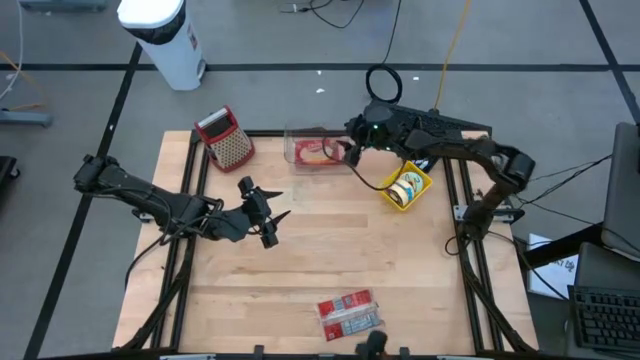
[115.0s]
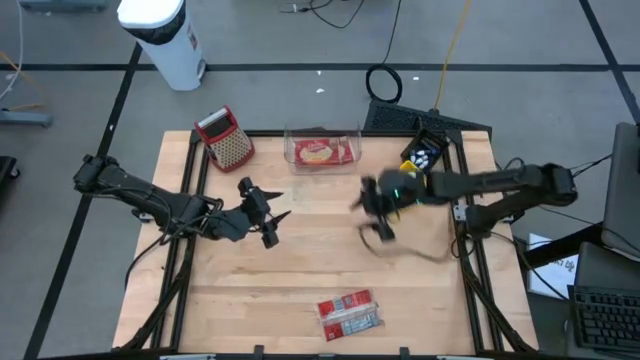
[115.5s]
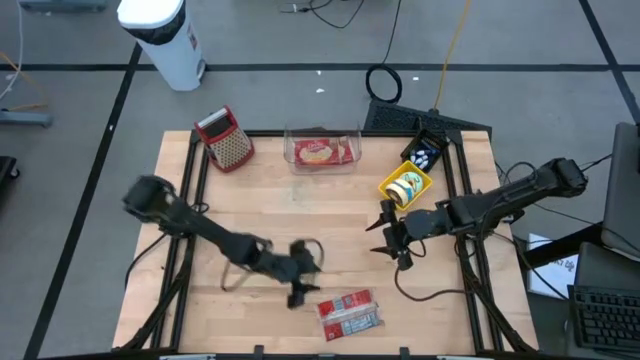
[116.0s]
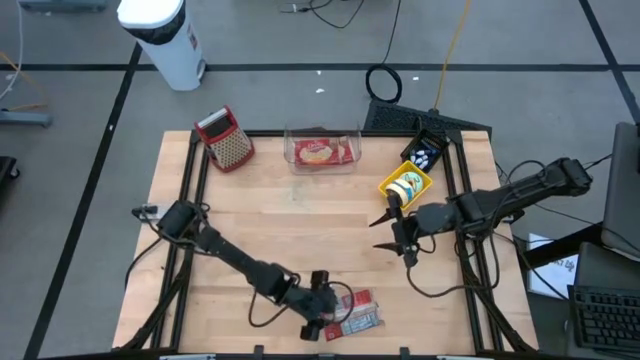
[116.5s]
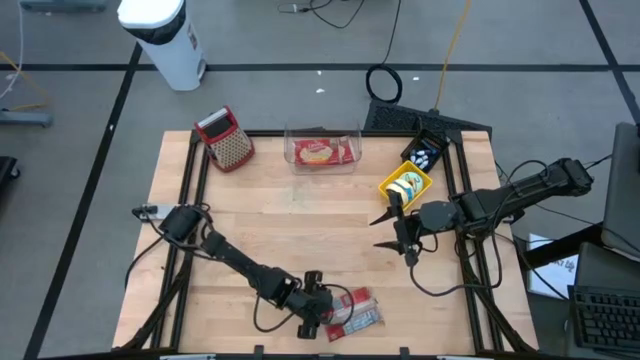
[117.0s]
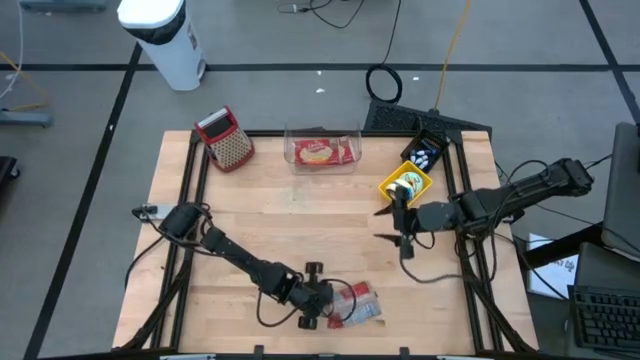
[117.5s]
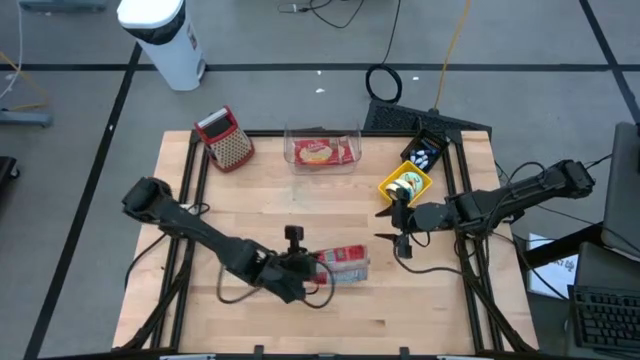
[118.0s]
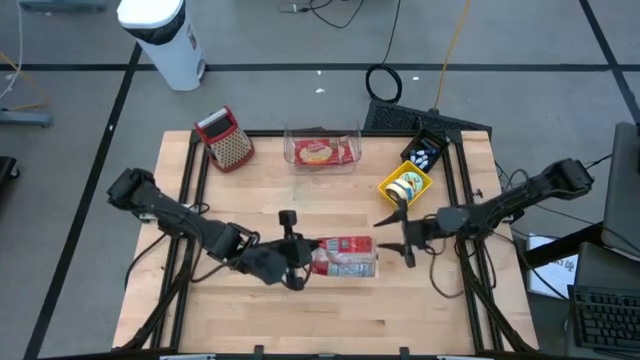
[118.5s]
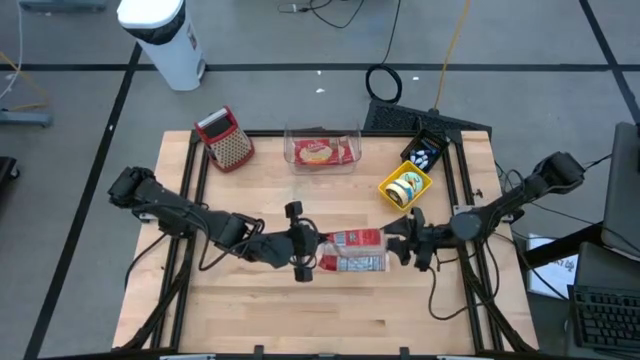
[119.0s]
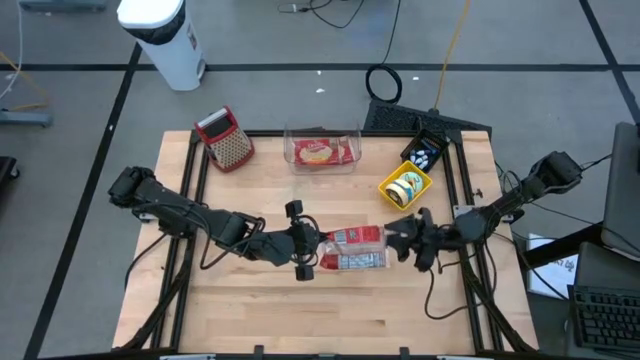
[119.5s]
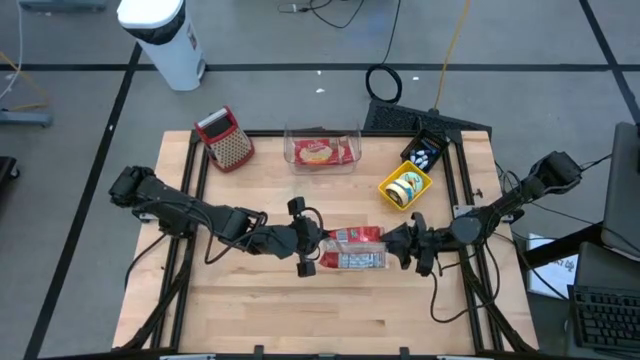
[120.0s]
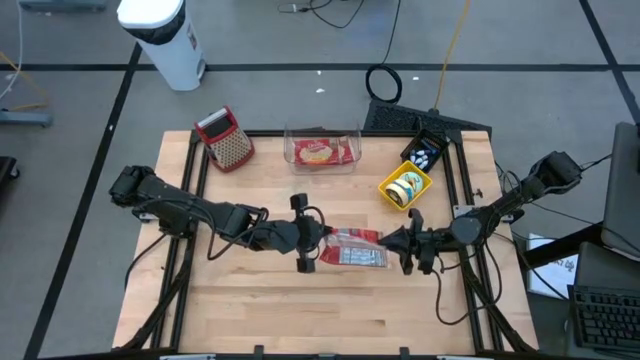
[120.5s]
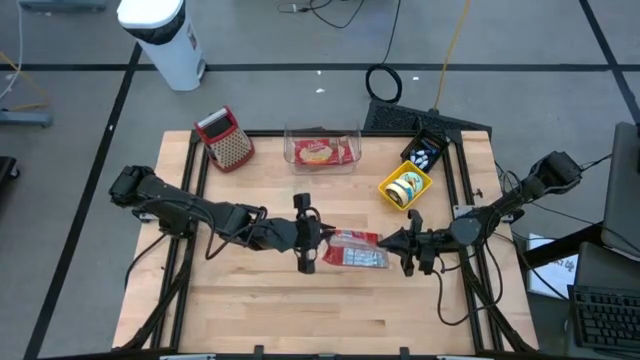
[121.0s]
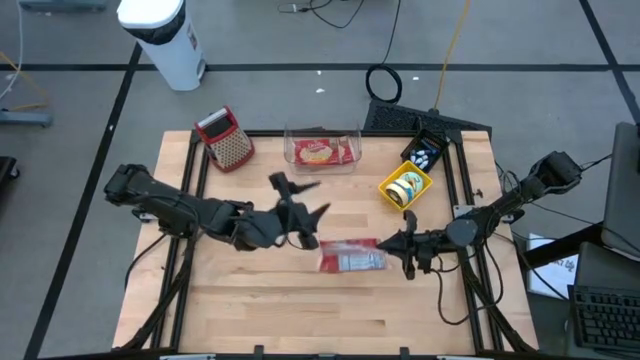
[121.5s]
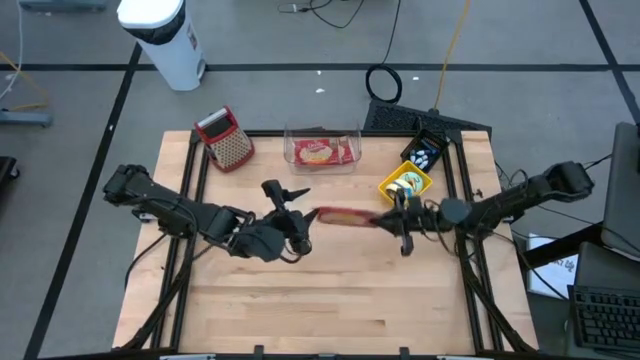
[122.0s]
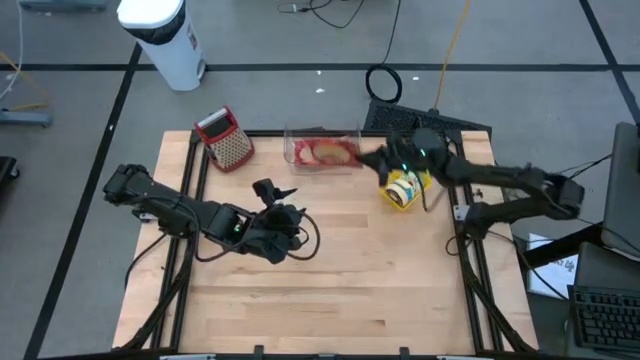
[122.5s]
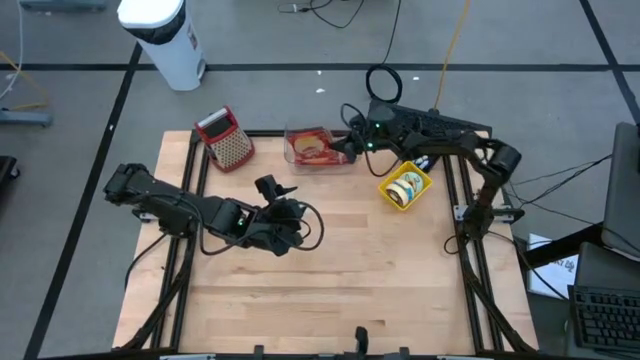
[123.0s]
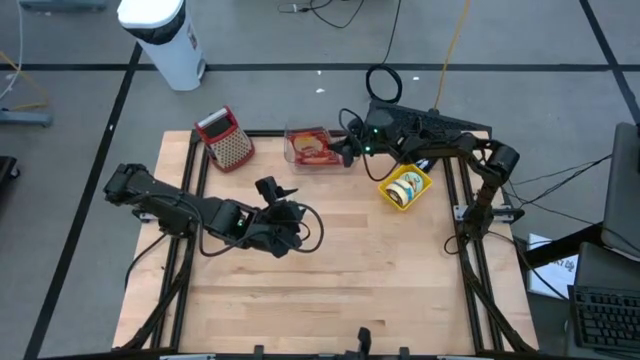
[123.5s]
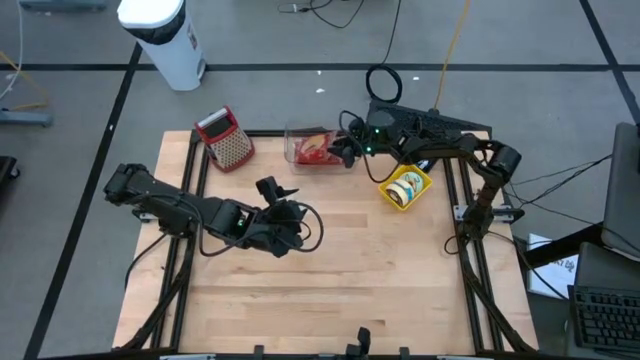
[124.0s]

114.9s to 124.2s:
Put the red popcorn bag into the transparent bin

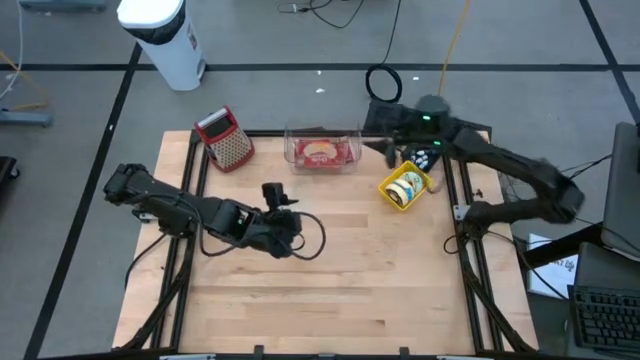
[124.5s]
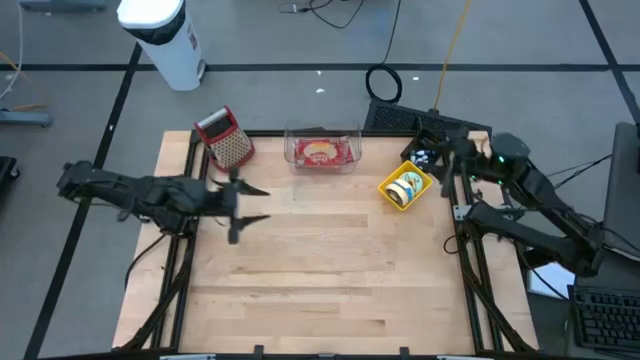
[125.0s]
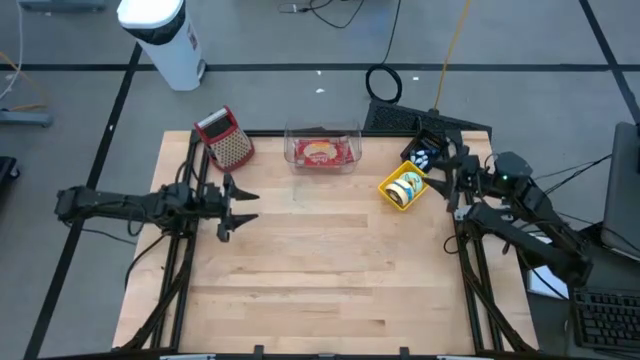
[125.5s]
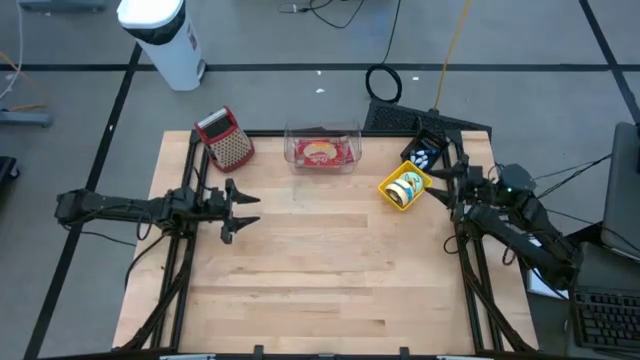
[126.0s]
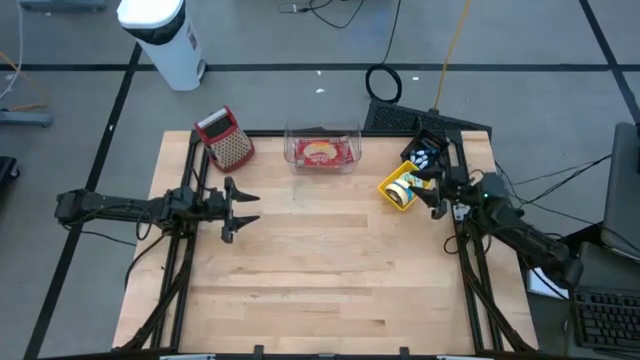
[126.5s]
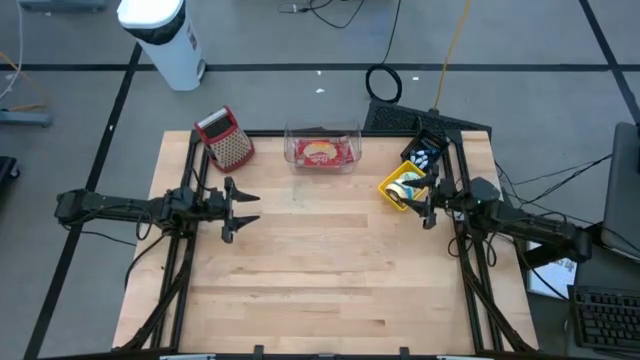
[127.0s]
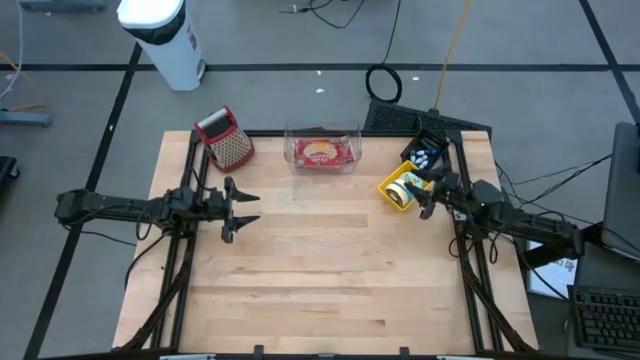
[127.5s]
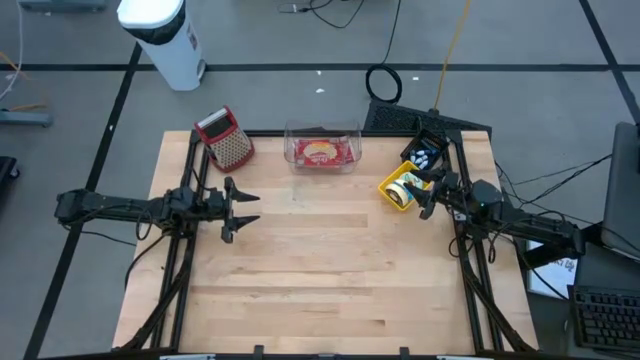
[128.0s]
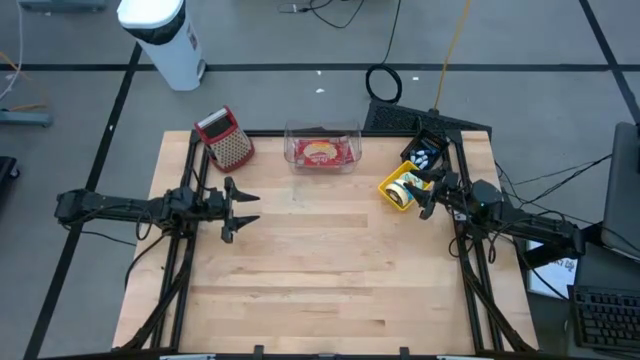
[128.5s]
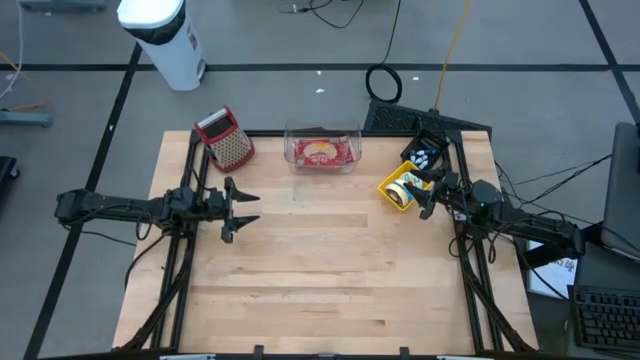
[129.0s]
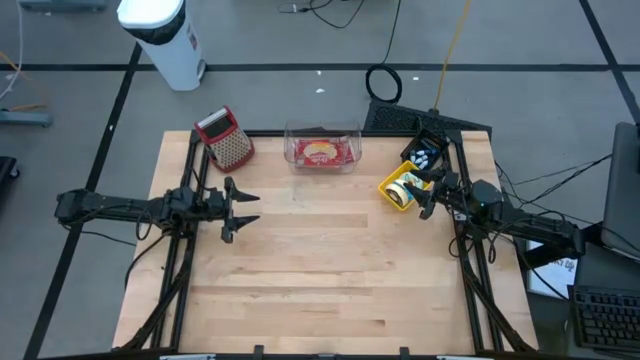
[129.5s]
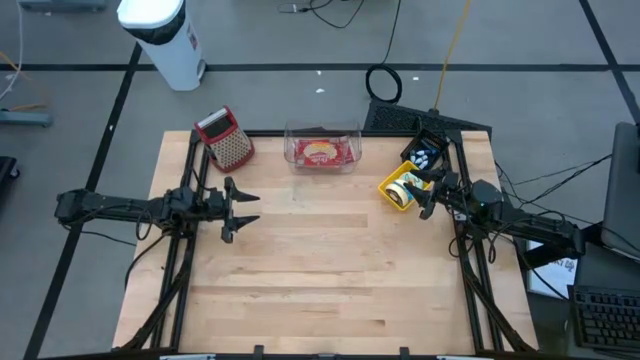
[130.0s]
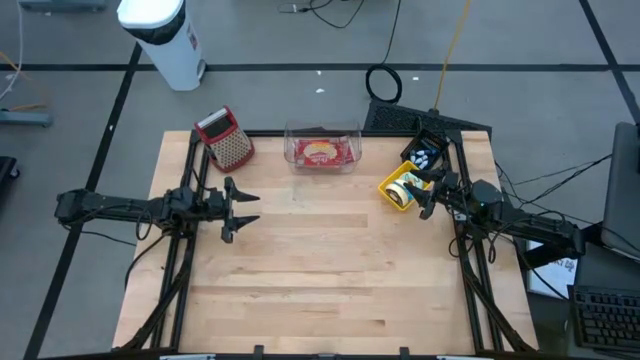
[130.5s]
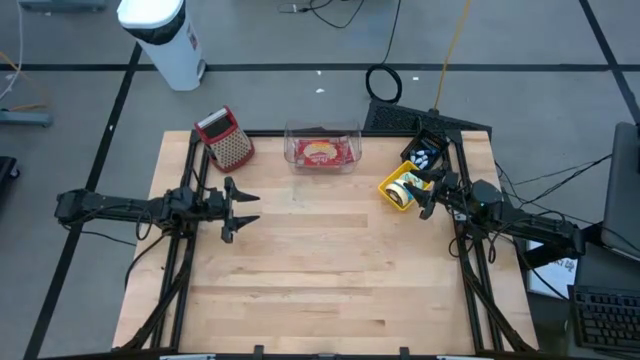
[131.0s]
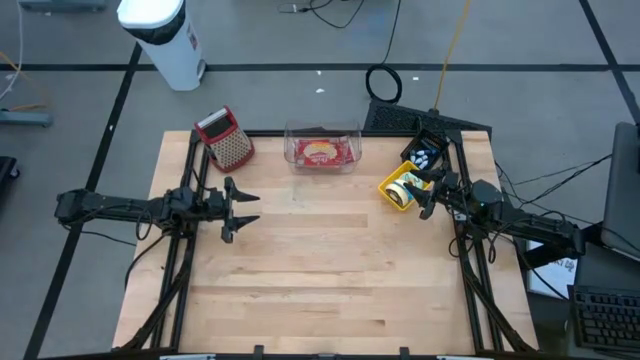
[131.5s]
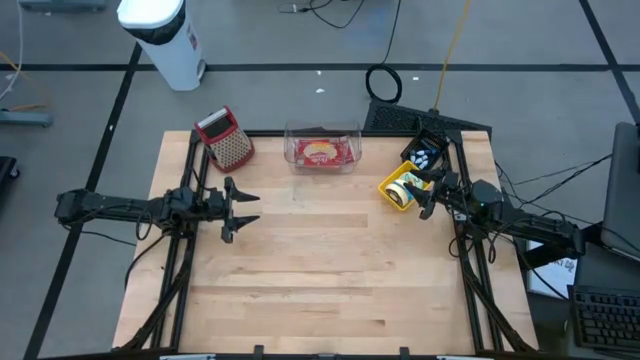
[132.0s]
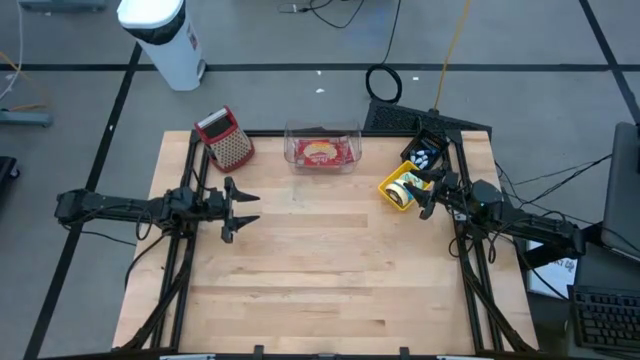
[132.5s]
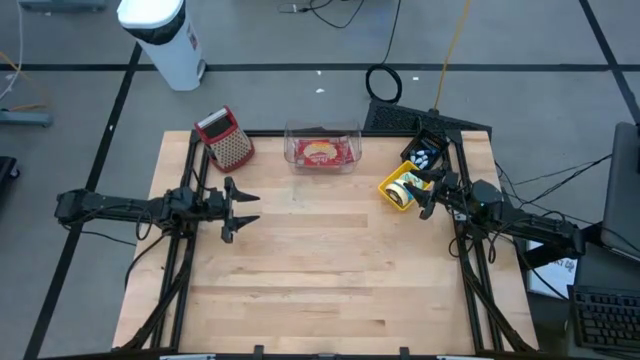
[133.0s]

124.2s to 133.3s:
Return to Home Position
